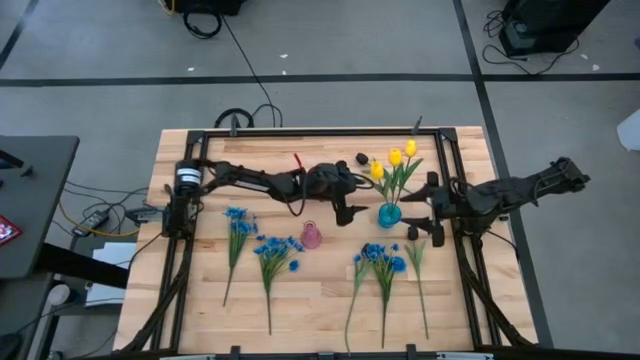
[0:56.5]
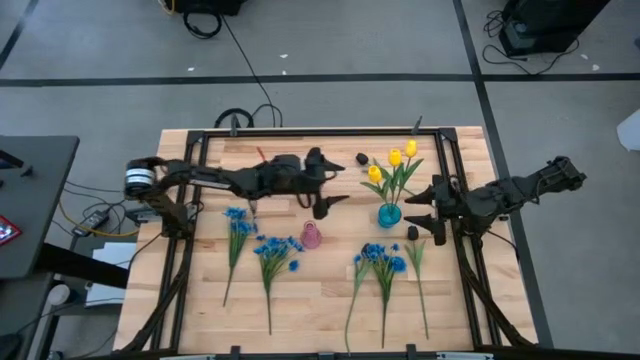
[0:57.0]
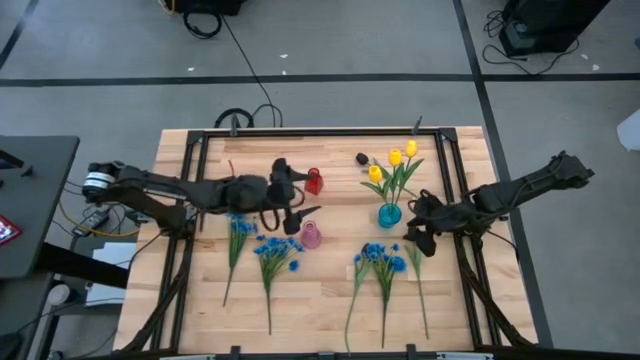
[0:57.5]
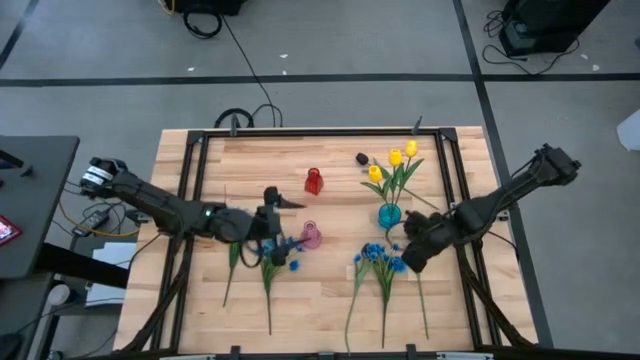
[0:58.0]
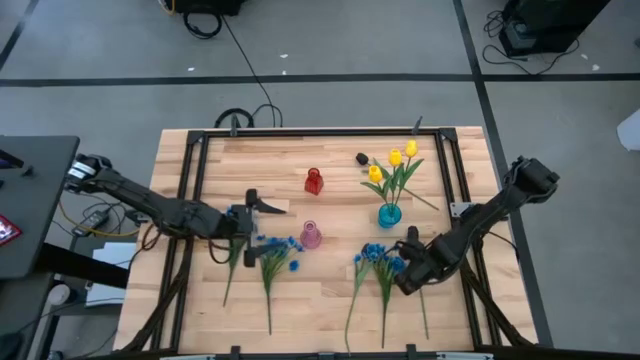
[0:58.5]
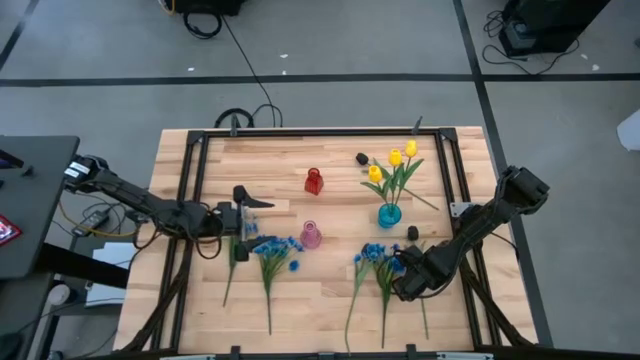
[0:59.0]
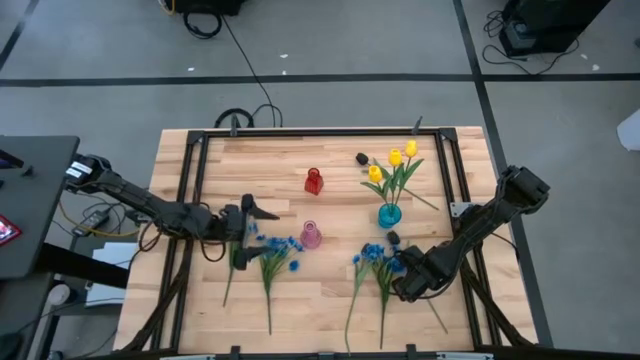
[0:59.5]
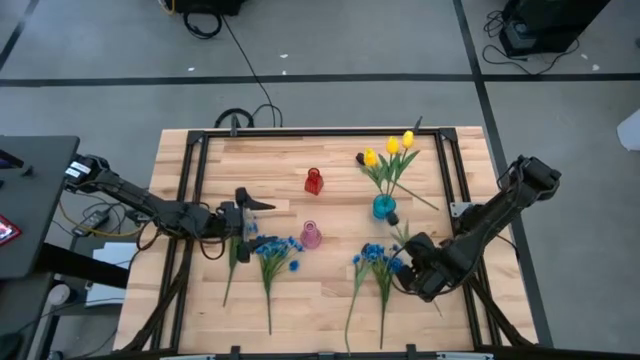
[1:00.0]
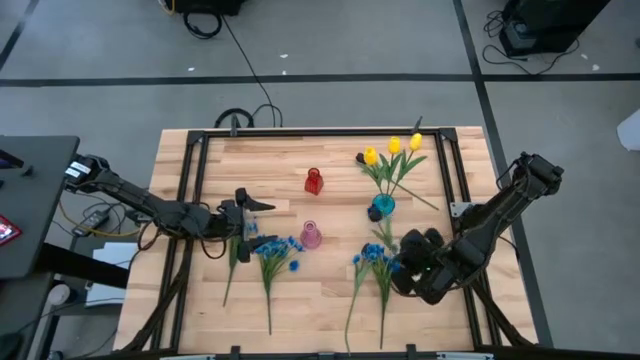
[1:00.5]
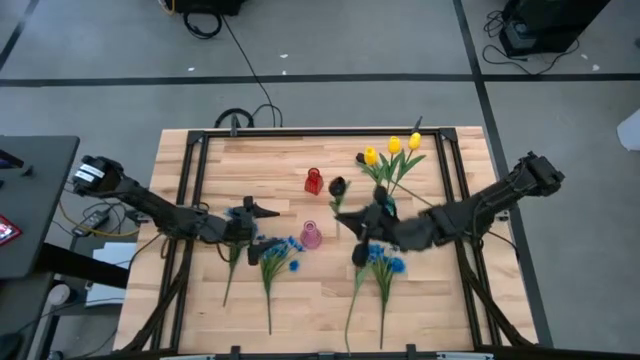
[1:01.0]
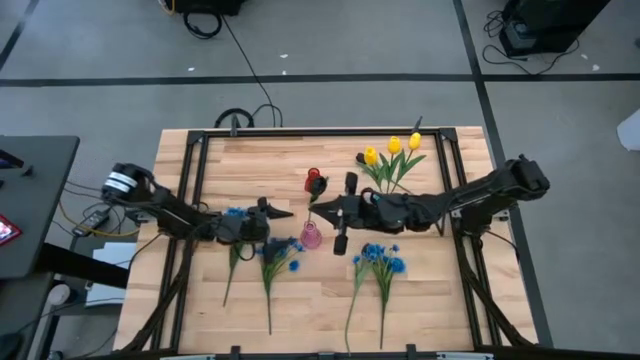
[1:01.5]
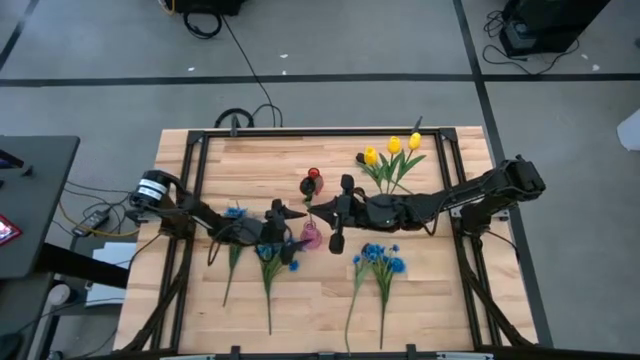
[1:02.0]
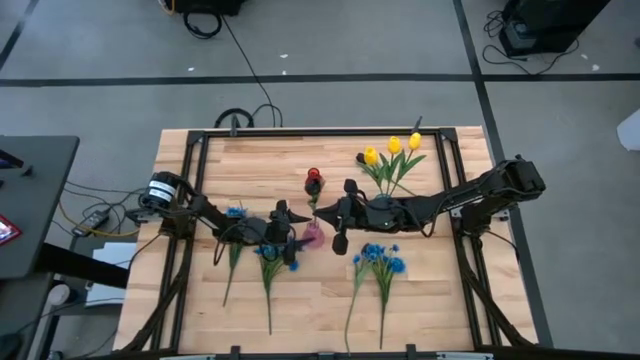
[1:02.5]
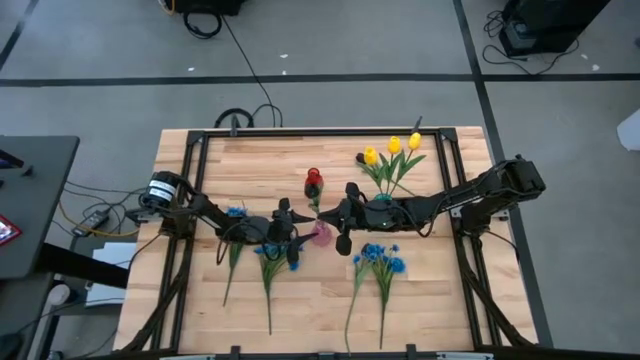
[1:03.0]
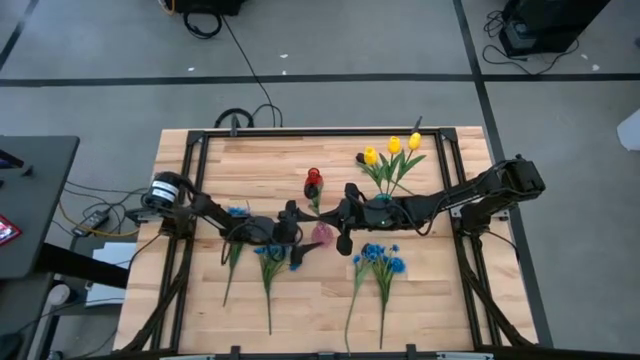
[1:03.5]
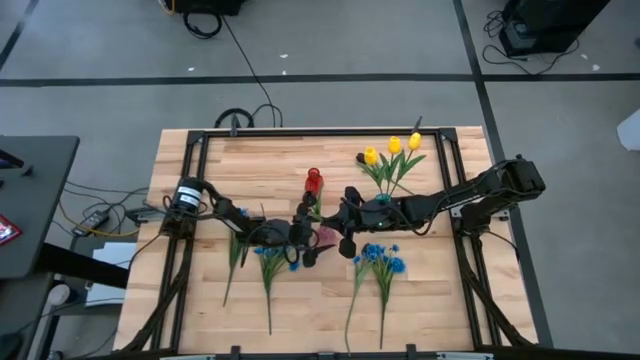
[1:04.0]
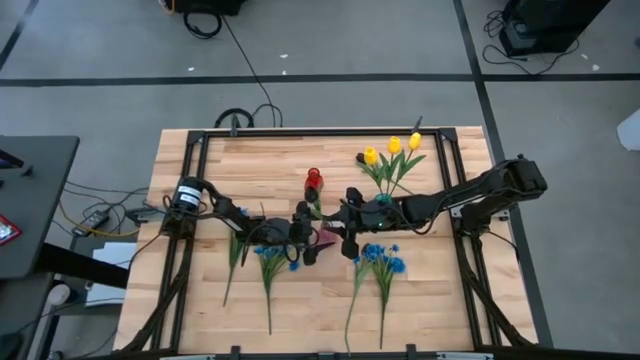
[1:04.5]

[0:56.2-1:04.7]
Task: Sort flowers into vase by color
Put the bottom right black flower into the pink vase

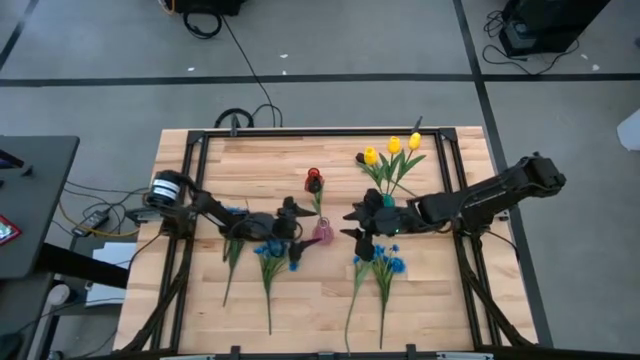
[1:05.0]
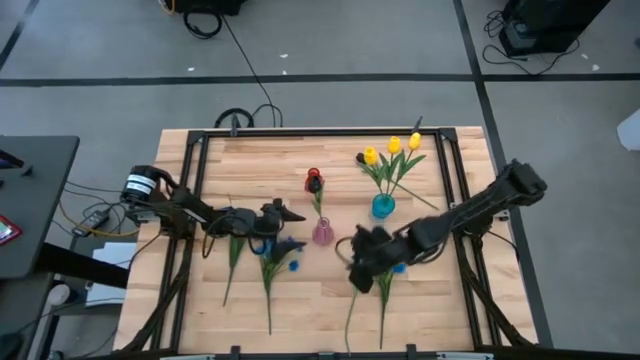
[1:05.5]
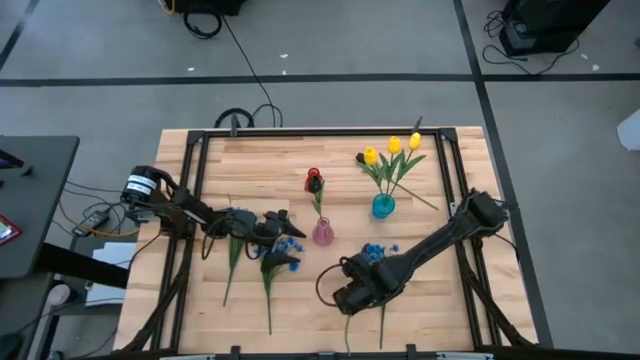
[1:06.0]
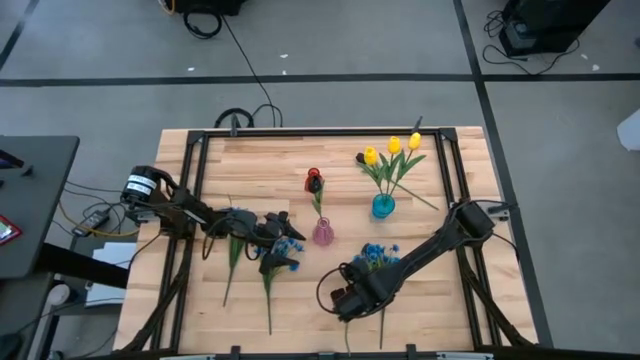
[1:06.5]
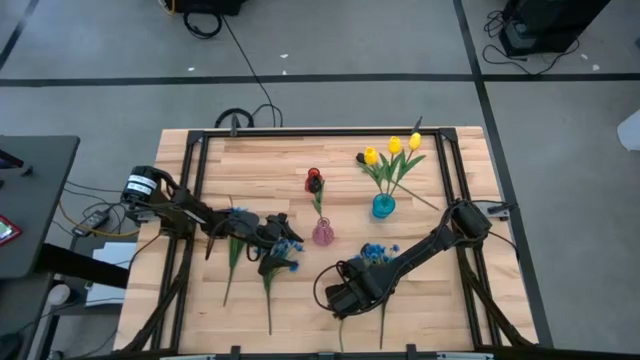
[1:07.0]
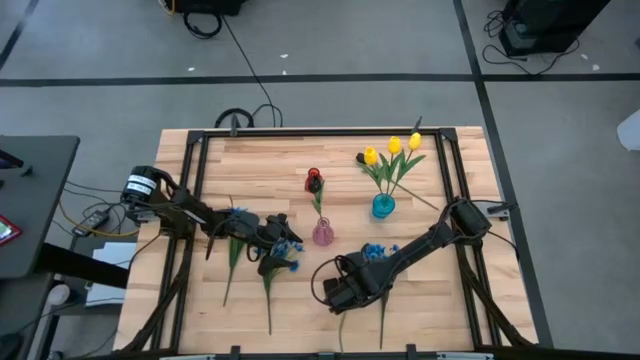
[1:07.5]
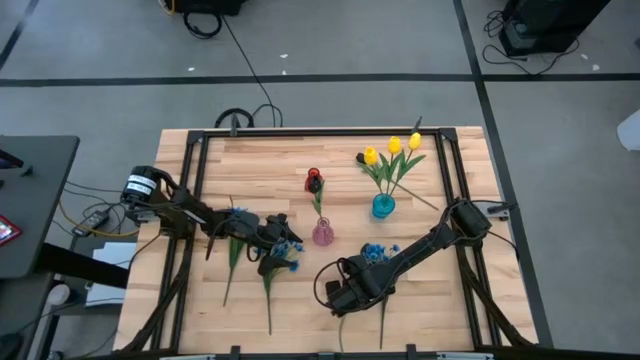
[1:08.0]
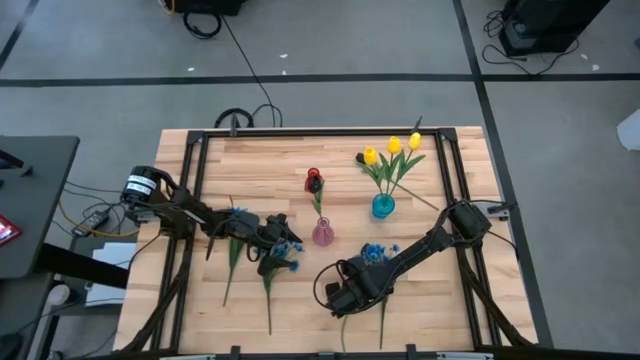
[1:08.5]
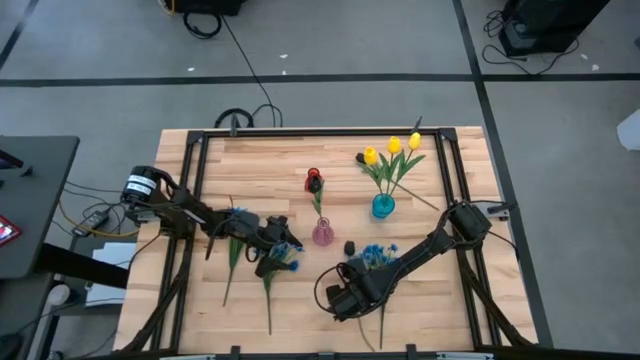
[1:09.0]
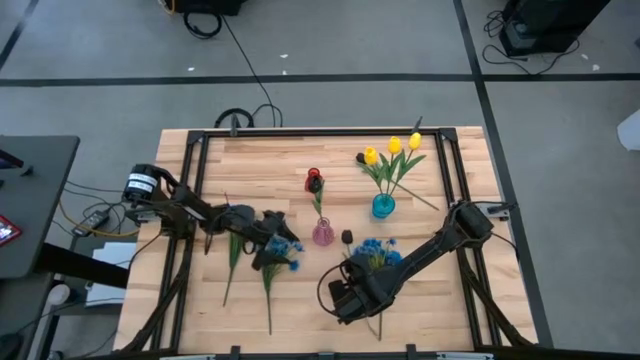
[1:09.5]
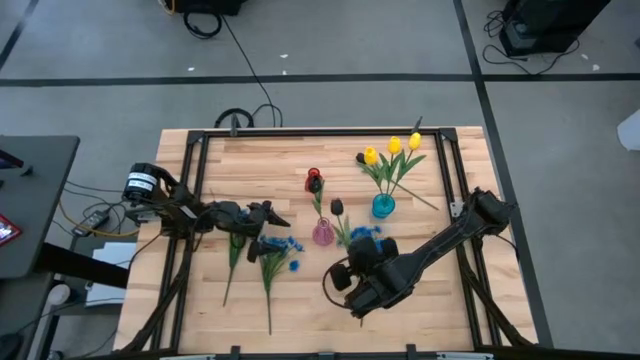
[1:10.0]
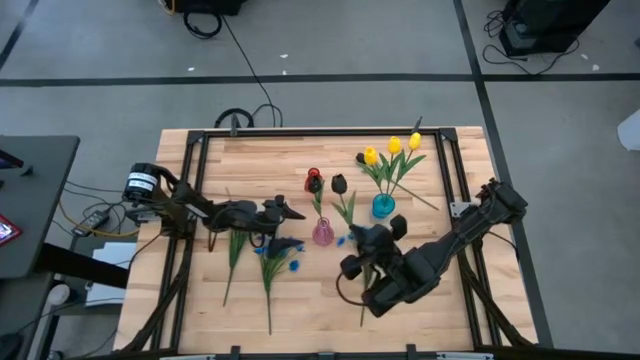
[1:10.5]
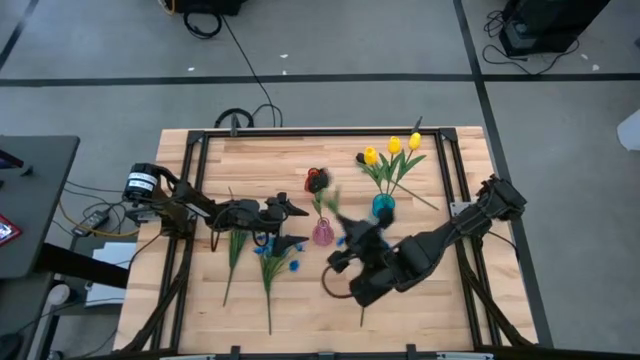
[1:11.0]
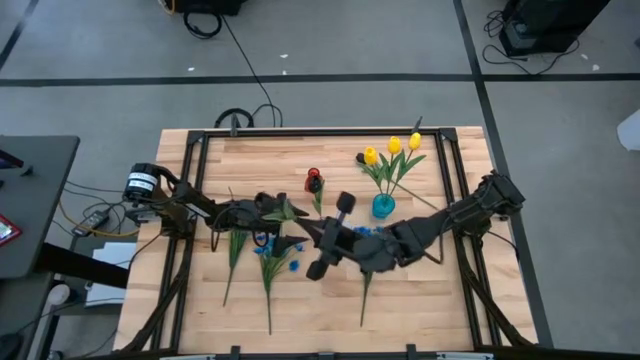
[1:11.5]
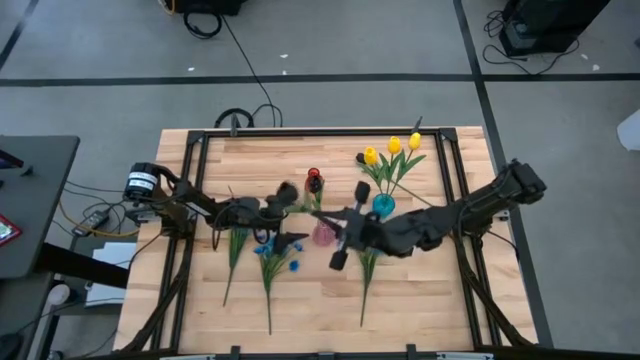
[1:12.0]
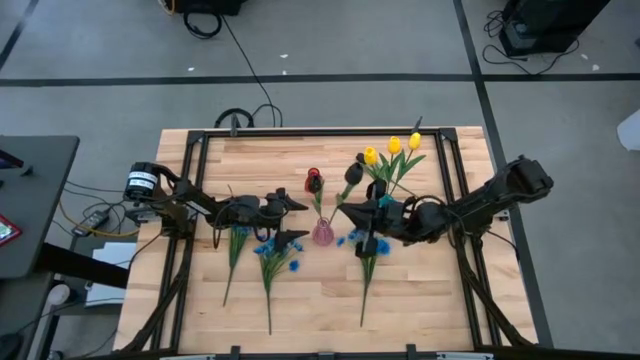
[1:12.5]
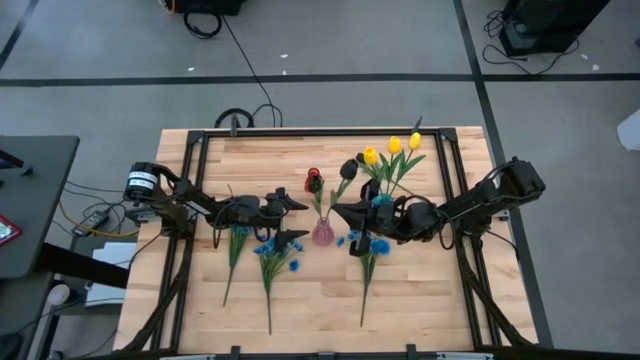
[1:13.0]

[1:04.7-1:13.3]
Put the bottom black flower into the pink vase

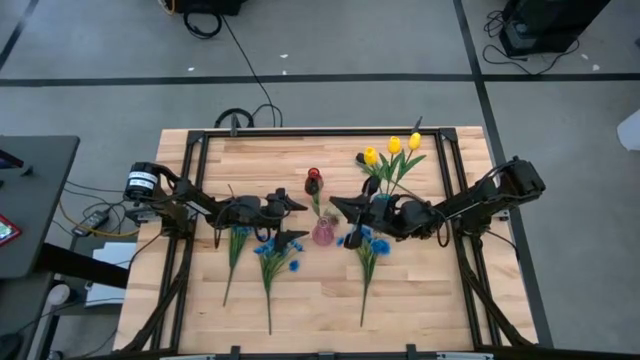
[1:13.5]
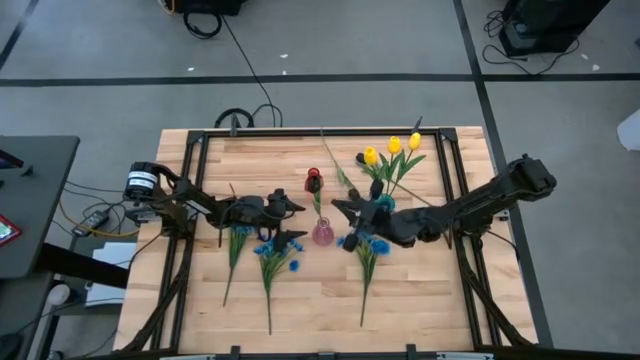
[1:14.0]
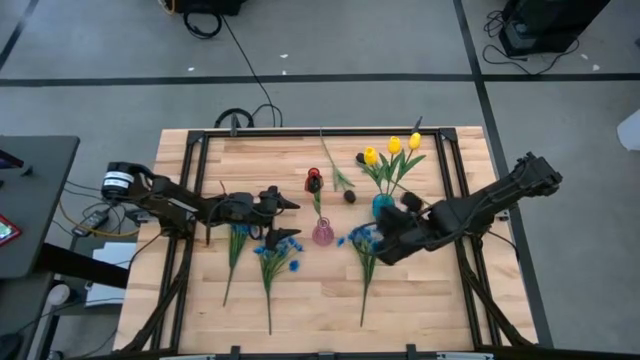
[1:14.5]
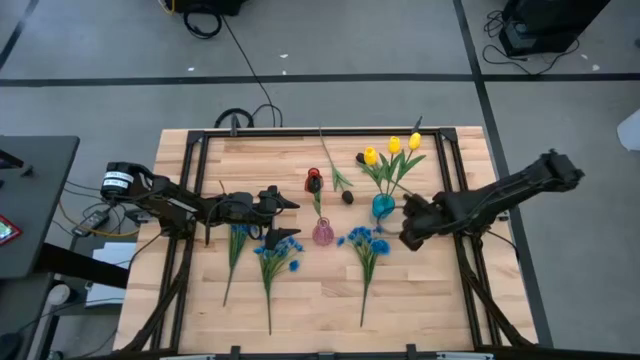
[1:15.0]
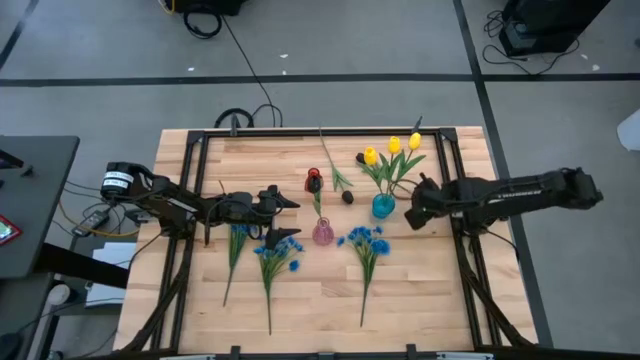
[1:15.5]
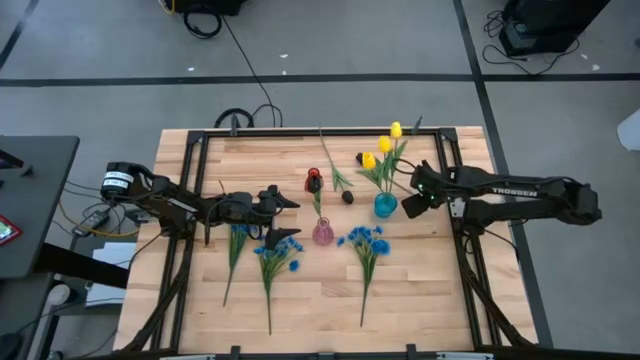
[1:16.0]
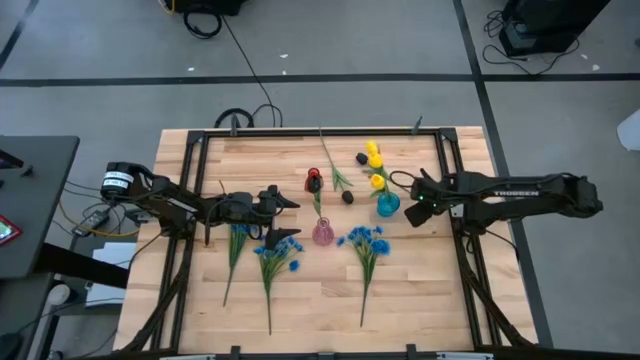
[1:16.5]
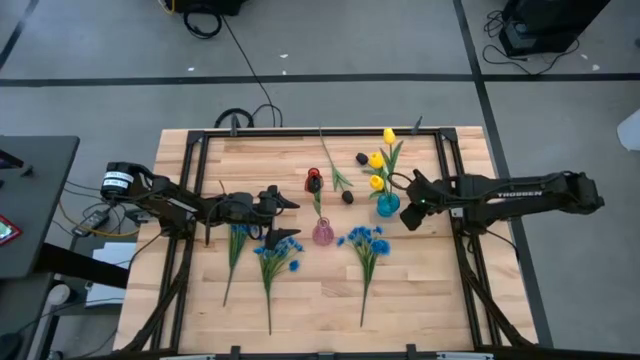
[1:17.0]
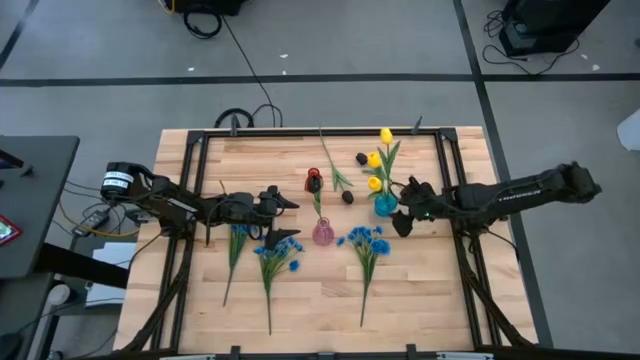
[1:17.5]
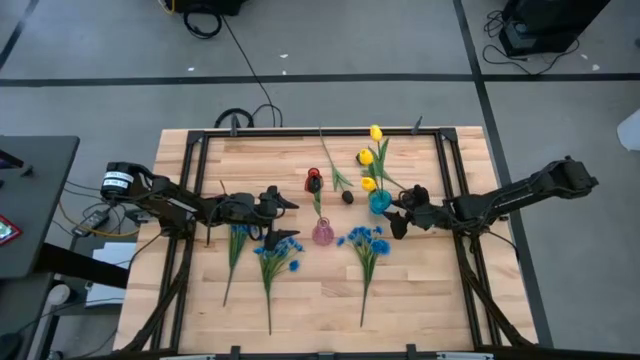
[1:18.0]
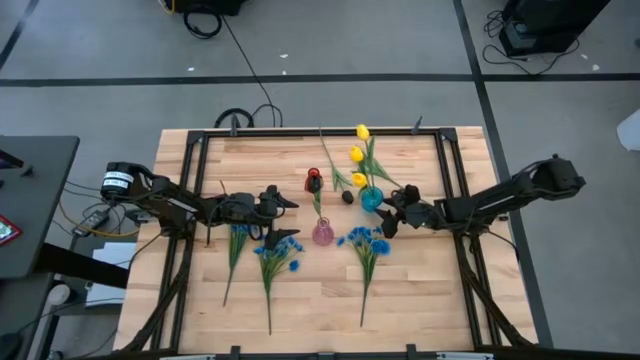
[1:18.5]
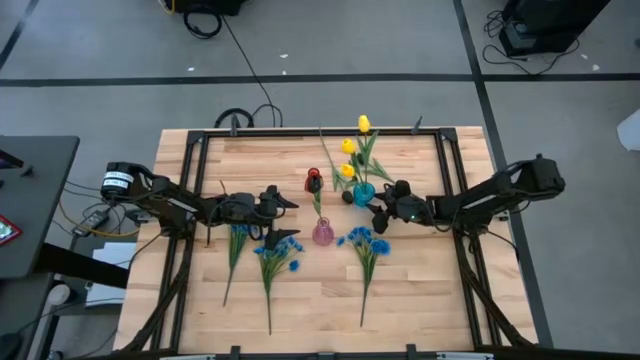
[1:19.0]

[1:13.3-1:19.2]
Adjust the blue vase
